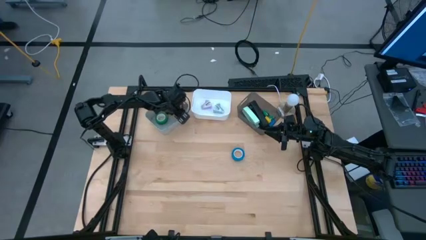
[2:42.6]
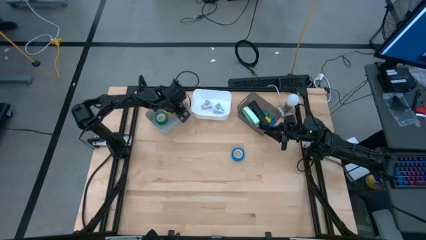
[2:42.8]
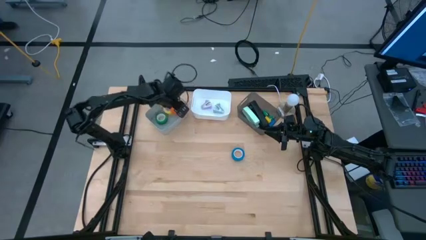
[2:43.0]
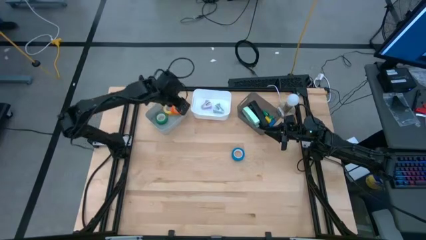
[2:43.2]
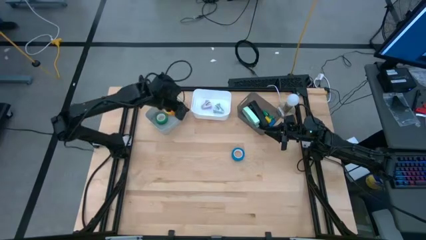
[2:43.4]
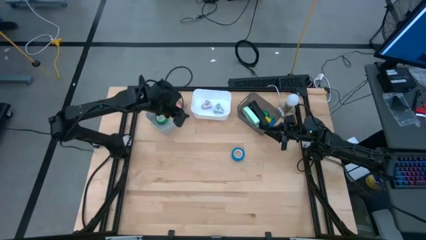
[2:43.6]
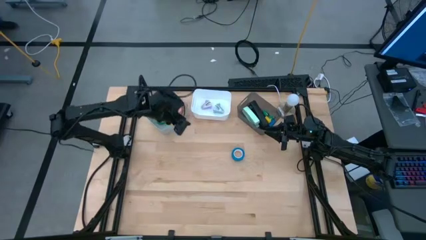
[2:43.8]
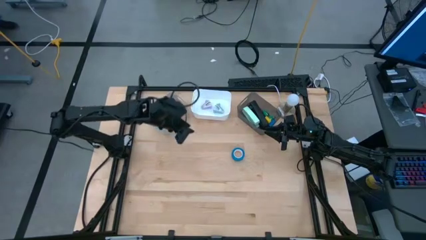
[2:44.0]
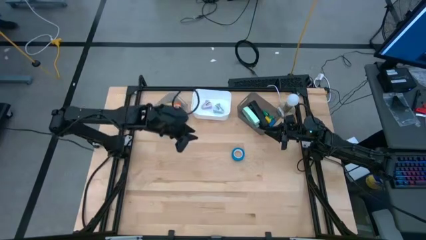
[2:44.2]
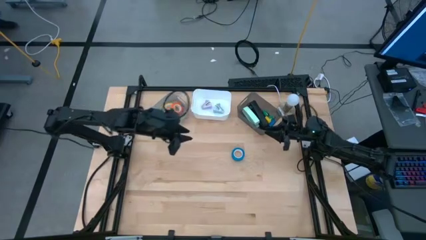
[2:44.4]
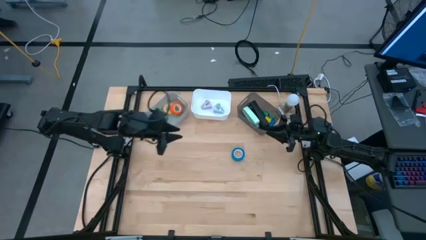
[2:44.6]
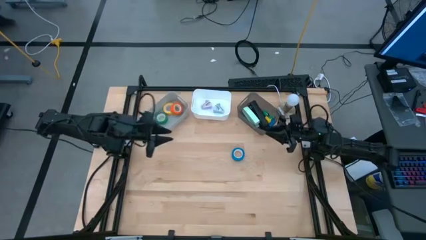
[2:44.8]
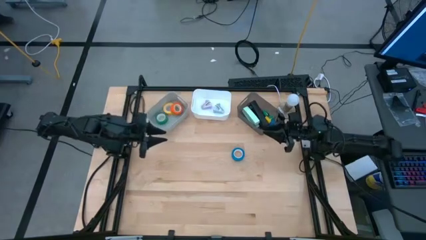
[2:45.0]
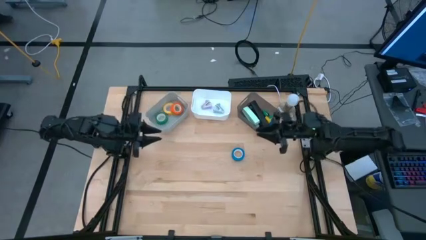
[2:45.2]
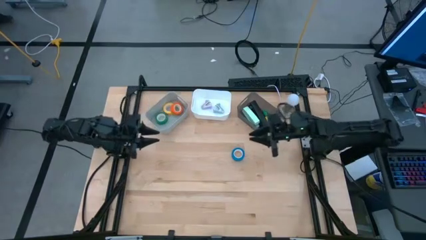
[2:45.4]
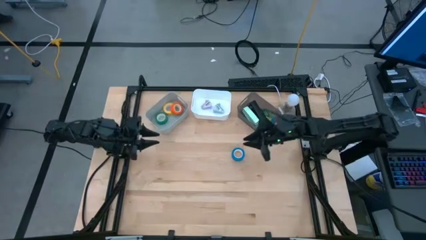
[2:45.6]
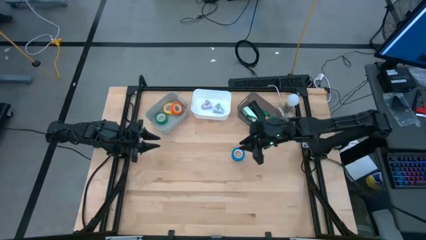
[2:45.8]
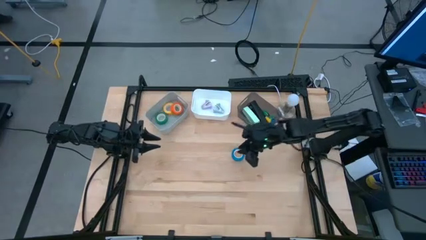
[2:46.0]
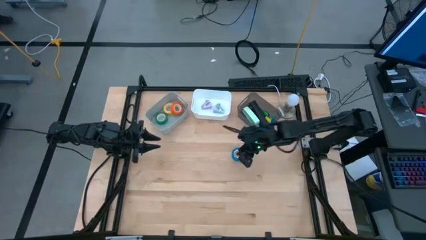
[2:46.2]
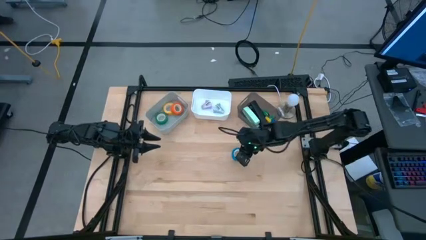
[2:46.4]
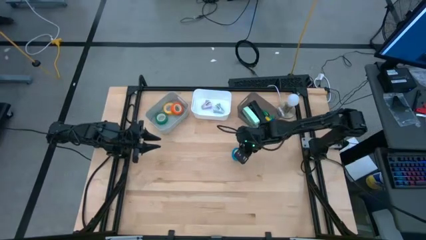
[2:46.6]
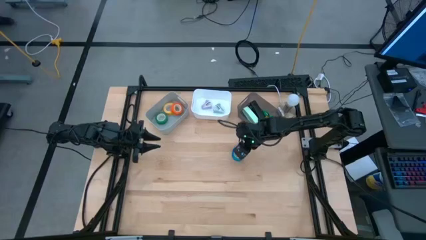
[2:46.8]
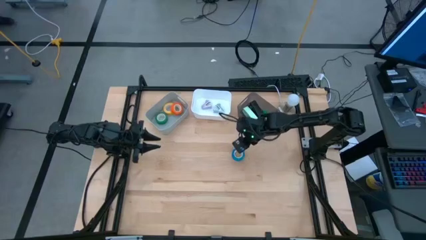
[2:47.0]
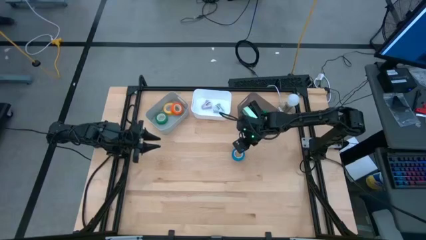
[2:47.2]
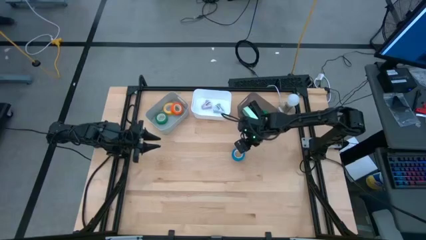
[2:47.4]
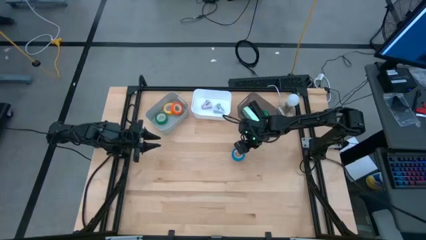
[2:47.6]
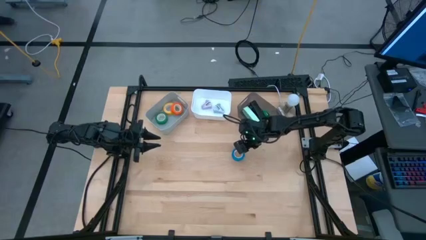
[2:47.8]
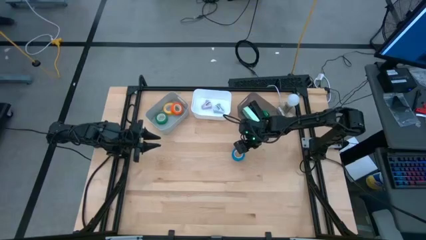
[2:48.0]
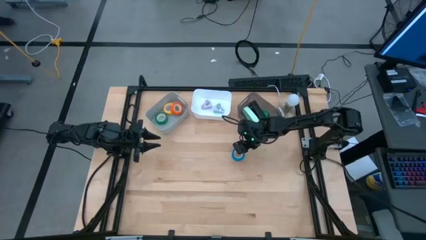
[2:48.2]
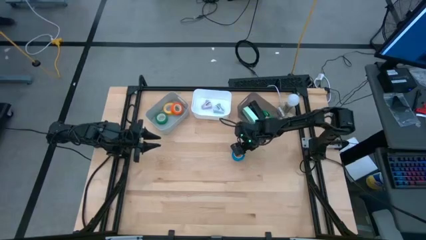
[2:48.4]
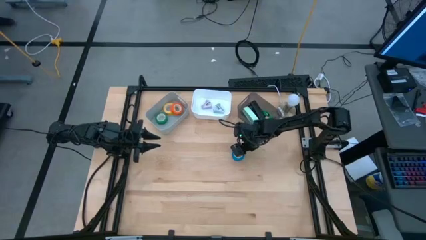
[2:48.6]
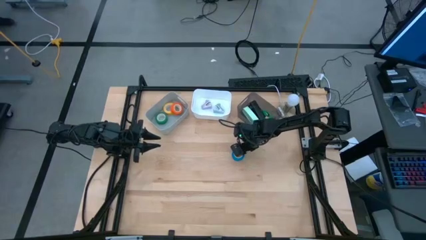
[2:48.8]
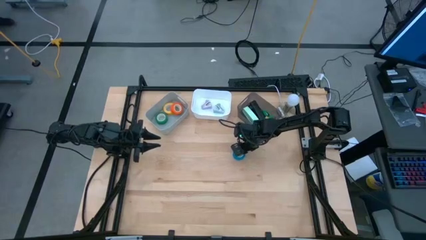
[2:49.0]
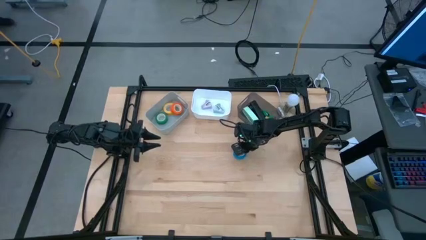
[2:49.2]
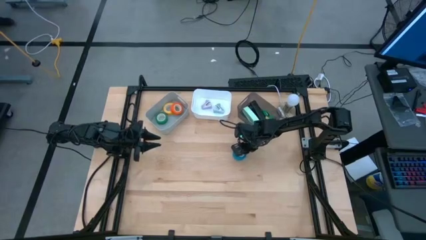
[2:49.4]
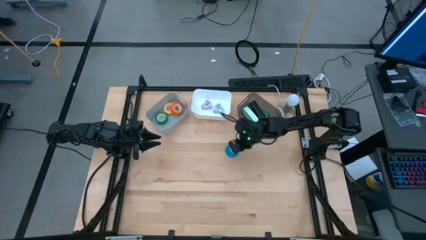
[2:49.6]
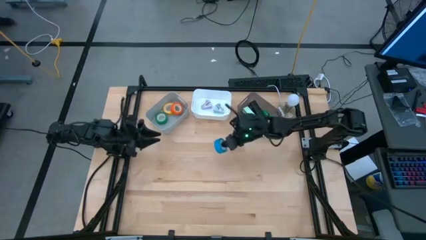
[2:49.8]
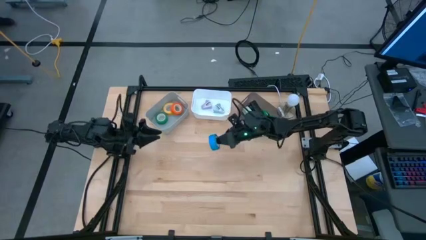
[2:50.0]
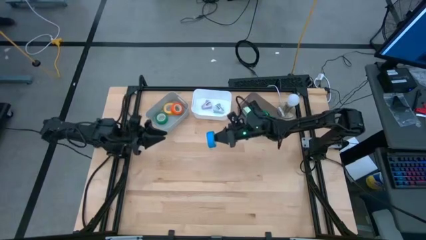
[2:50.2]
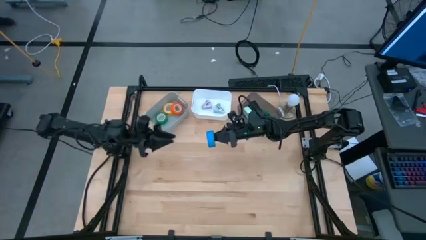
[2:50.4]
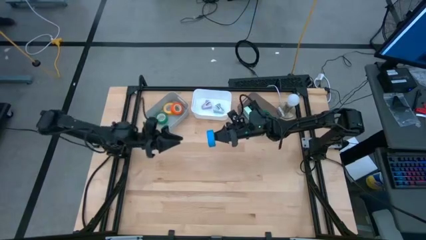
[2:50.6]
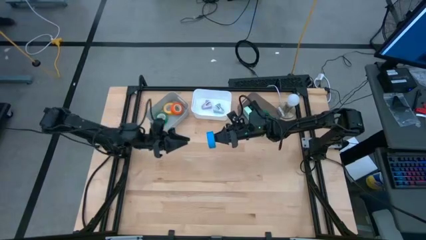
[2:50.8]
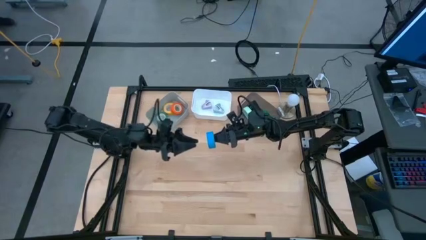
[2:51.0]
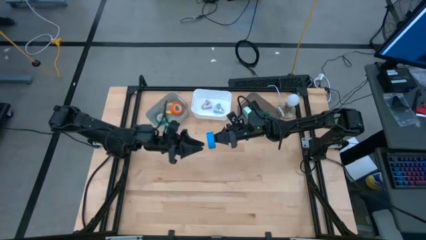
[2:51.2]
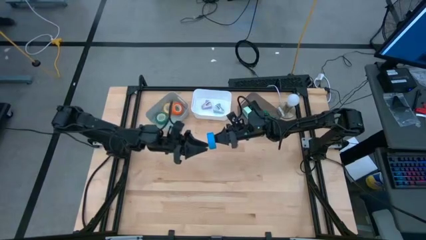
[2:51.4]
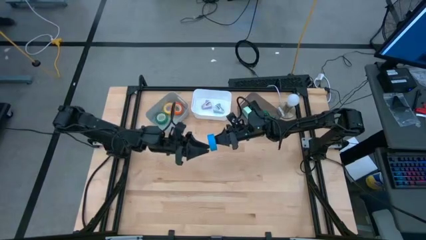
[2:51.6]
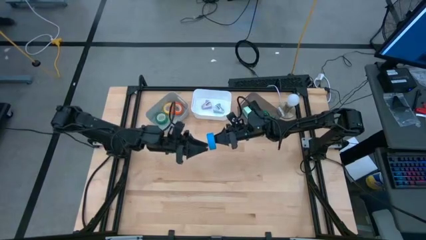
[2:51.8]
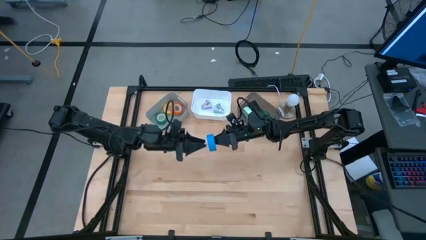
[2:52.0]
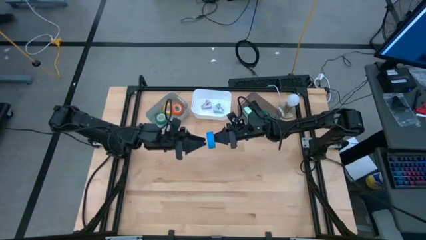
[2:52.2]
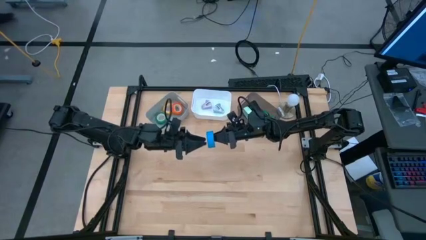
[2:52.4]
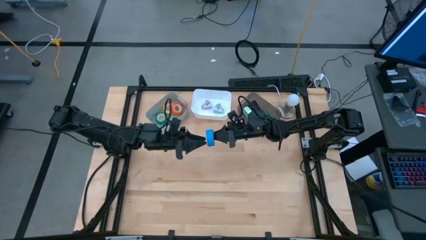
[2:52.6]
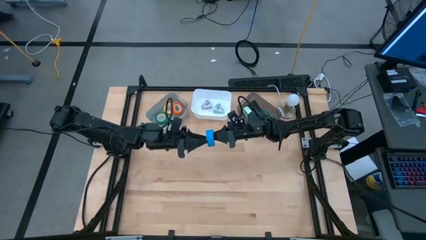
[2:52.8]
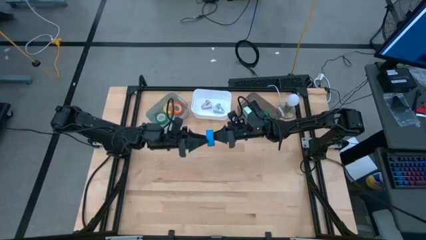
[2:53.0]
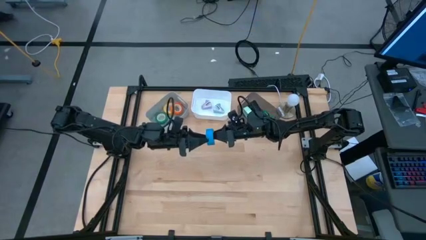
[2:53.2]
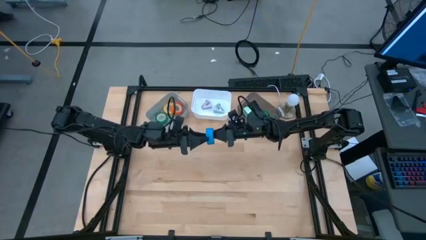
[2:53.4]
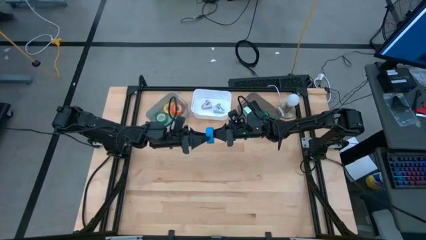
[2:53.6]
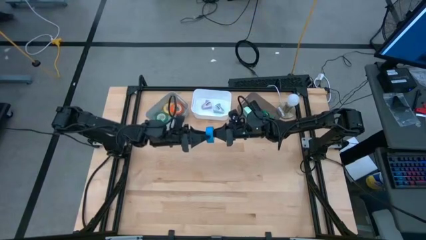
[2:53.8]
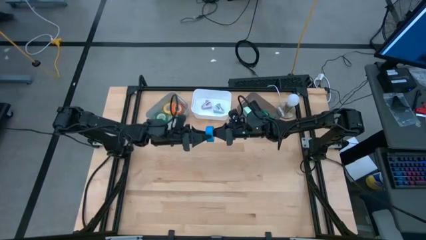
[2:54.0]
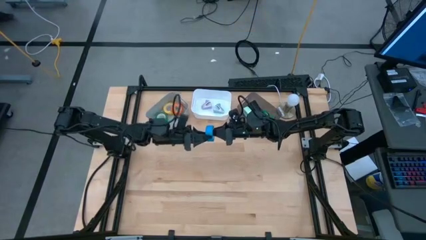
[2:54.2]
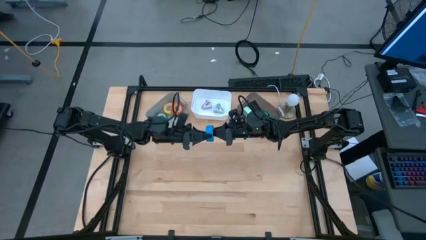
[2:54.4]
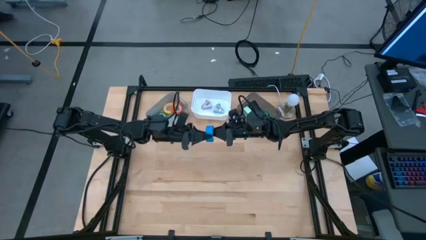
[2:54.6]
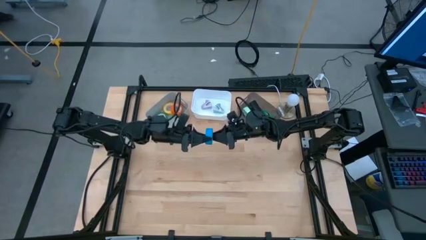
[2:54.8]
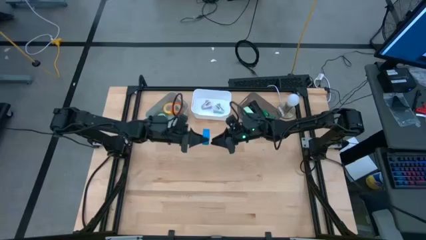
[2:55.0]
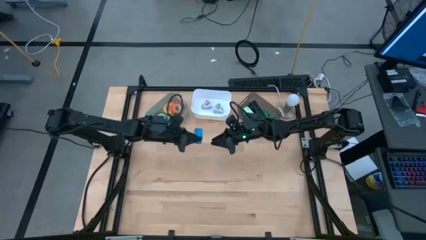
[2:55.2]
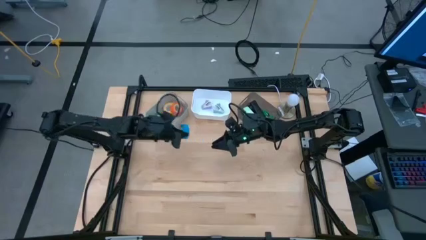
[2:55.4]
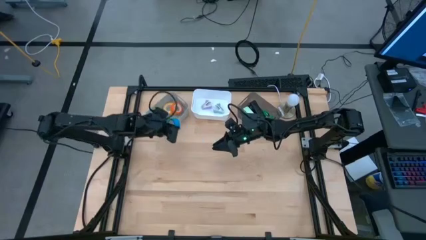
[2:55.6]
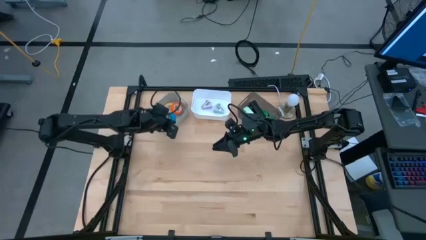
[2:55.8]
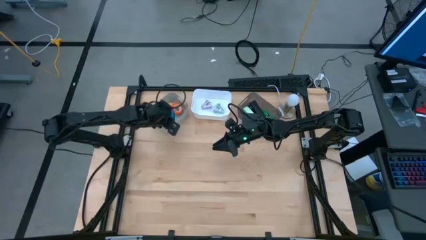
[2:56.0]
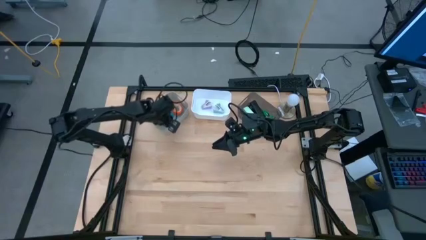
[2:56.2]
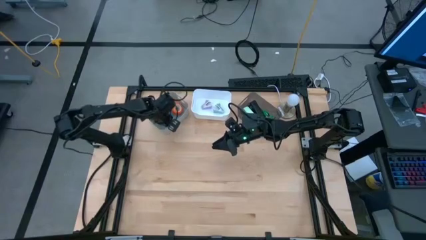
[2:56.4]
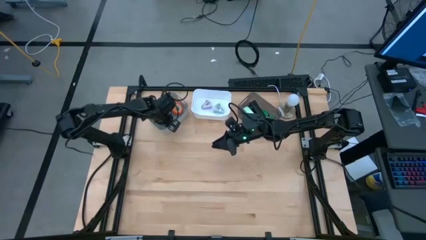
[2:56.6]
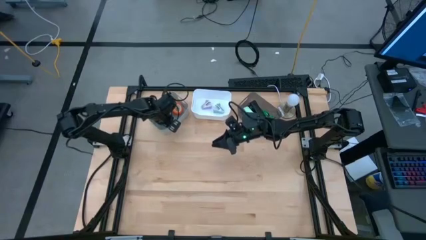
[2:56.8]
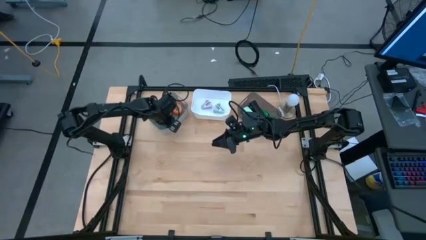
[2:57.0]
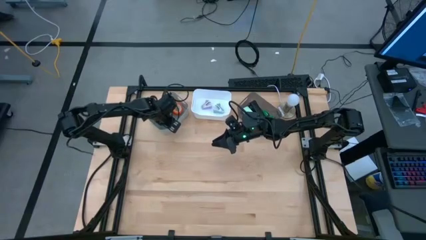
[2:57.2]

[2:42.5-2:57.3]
Task: Pick and place Stapler, Stapler remover, tape
Put the blue tape into the gray bin
